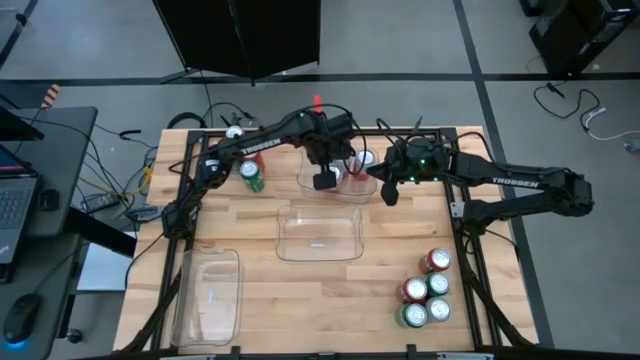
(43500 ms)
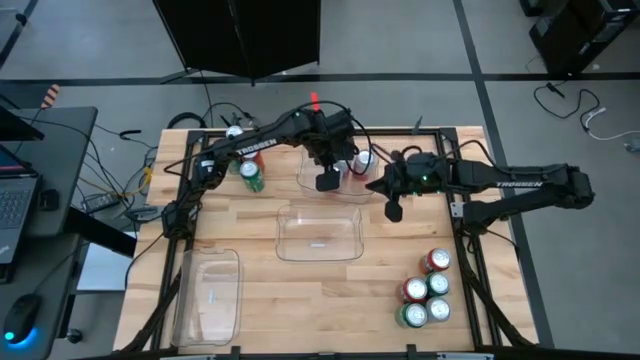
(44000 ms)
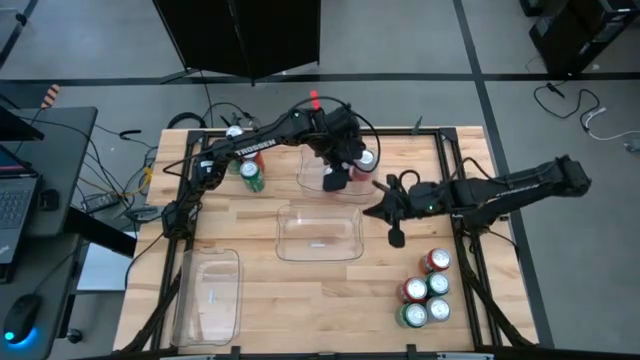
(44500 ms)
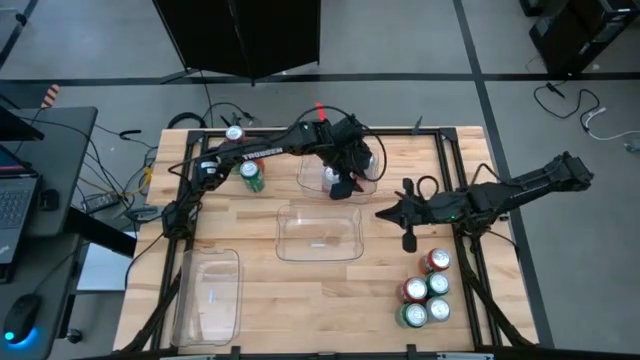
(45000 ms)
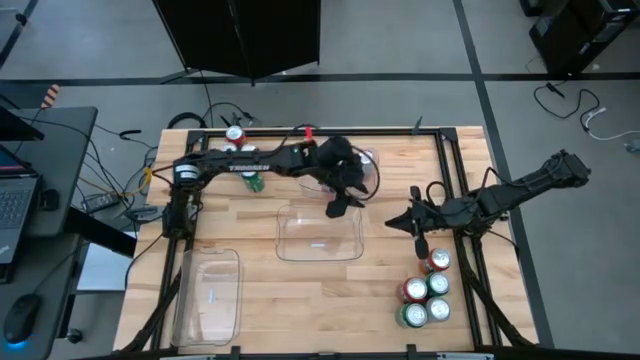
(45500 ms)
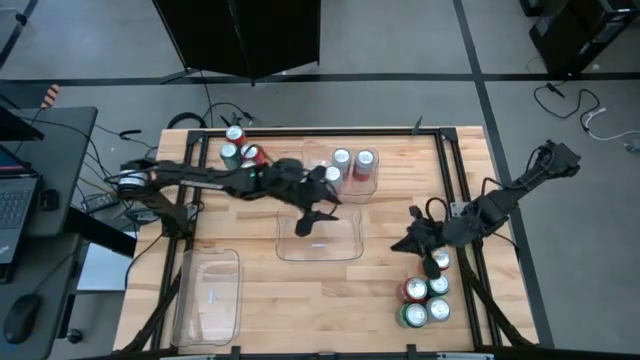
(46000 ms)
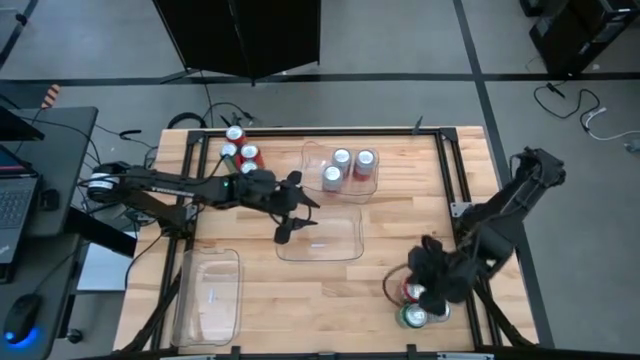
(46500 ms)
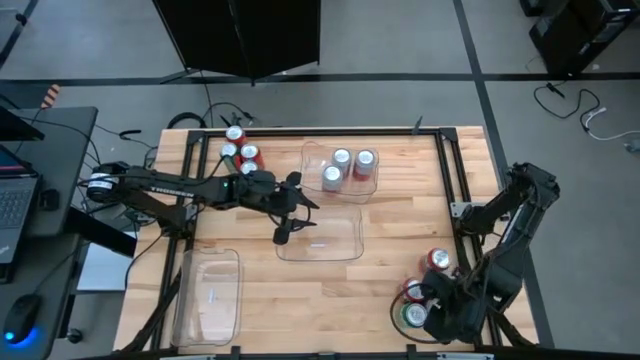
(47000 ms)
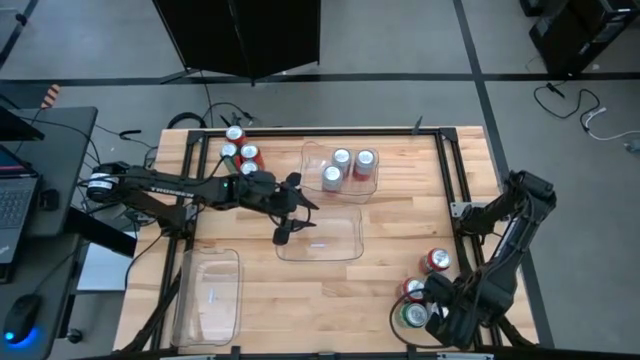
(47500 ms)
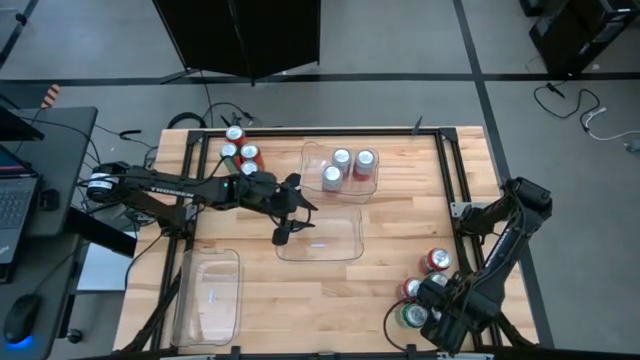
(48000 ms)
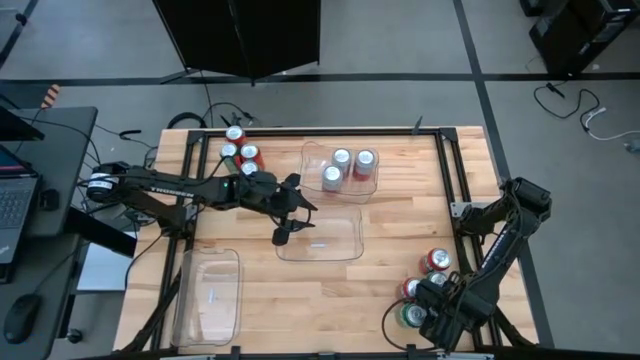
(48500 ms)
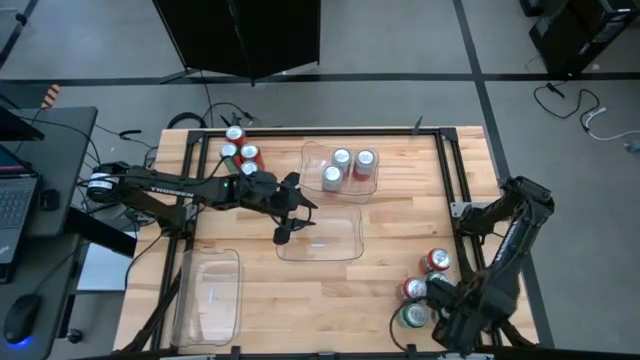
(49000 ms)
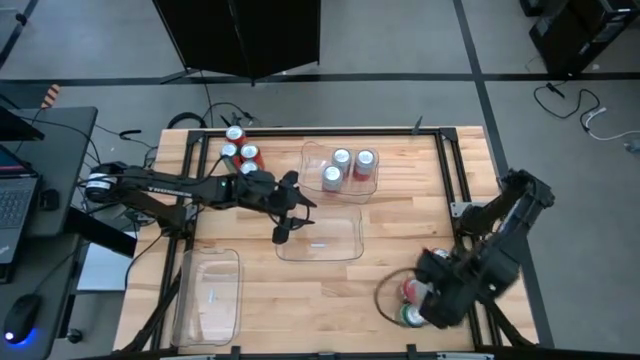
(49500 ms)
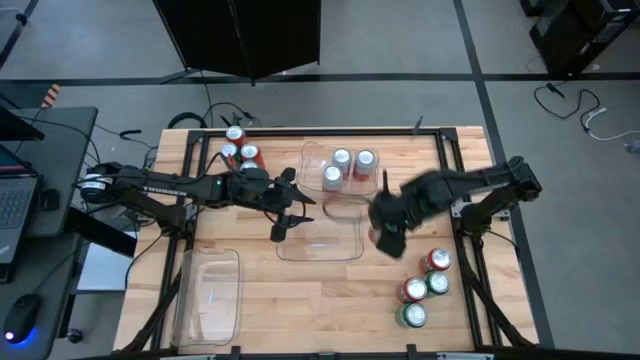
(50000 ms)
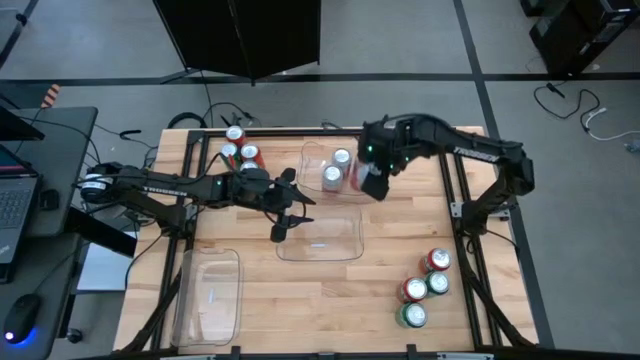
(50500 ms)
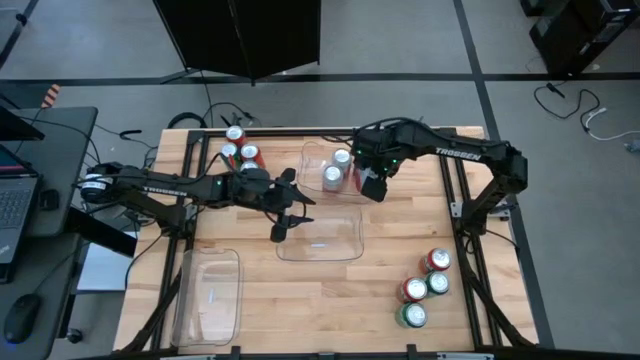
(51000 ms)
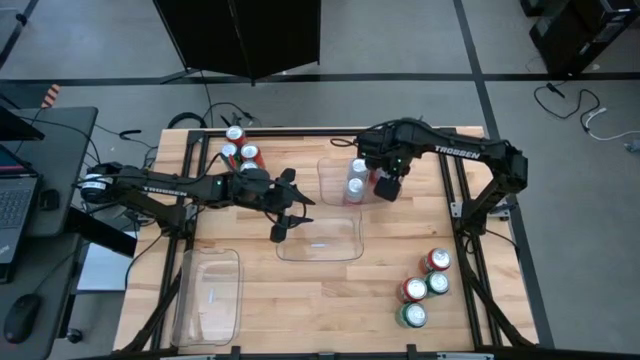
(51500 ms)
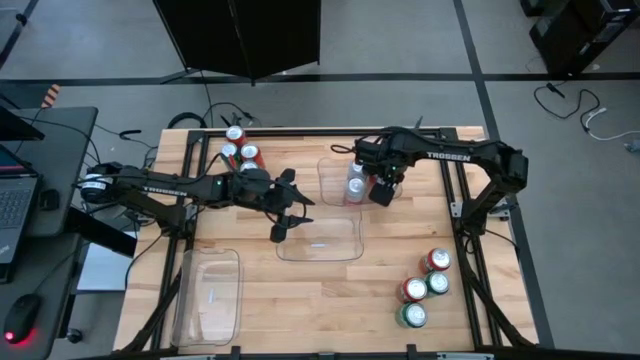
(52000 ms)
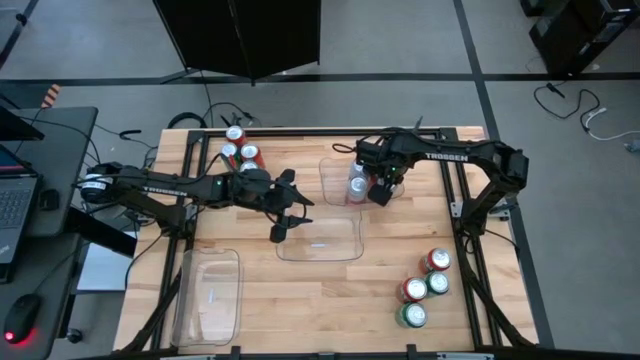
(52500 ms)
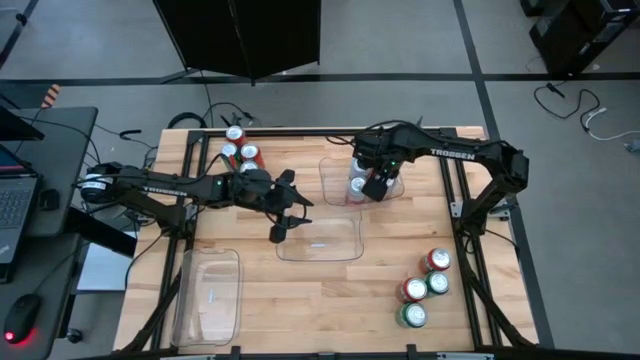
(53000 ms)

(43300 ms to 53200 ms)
Task: Sort soda cans
Put the pink white soda can into the top transparent bin

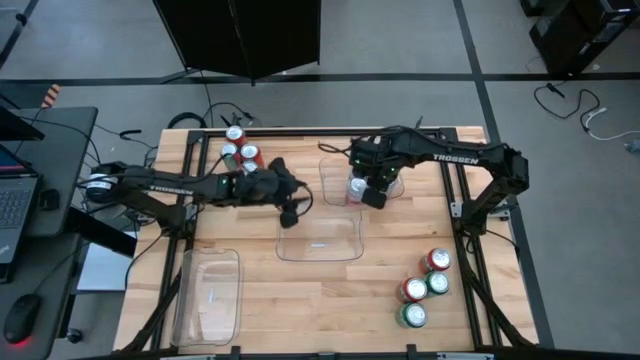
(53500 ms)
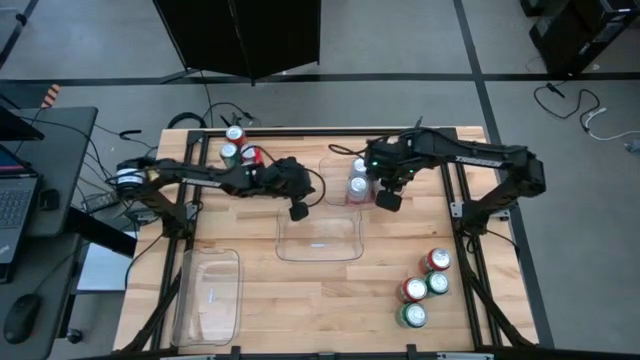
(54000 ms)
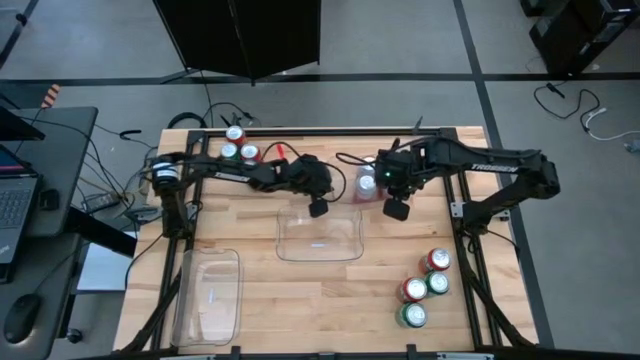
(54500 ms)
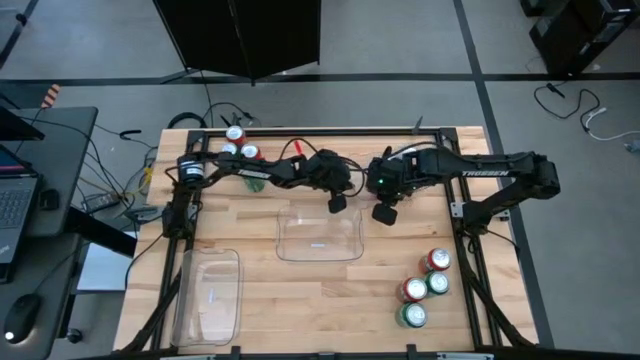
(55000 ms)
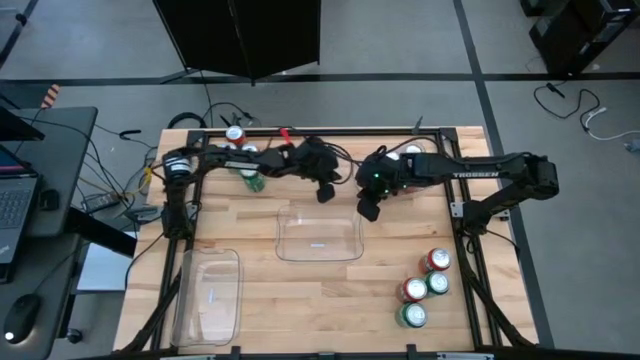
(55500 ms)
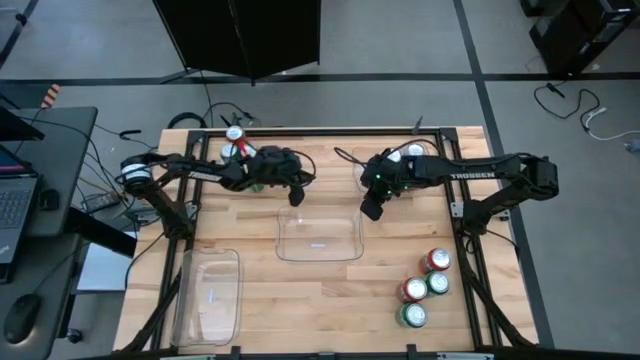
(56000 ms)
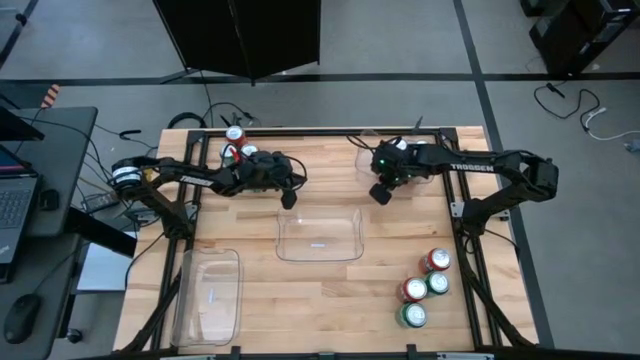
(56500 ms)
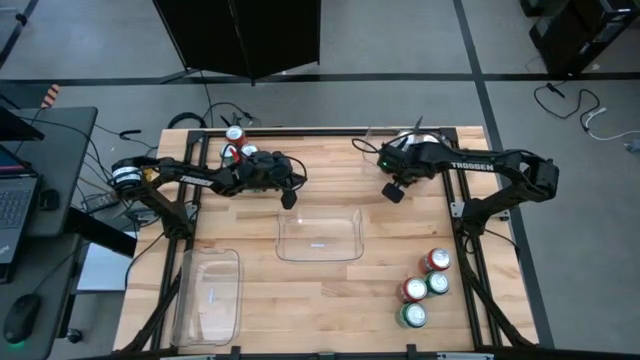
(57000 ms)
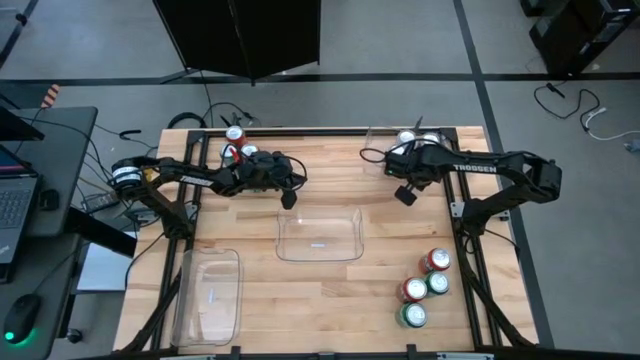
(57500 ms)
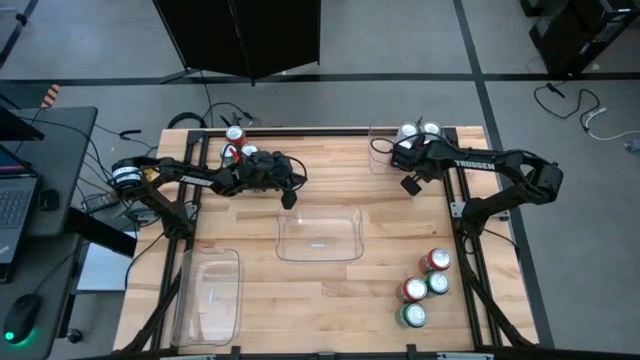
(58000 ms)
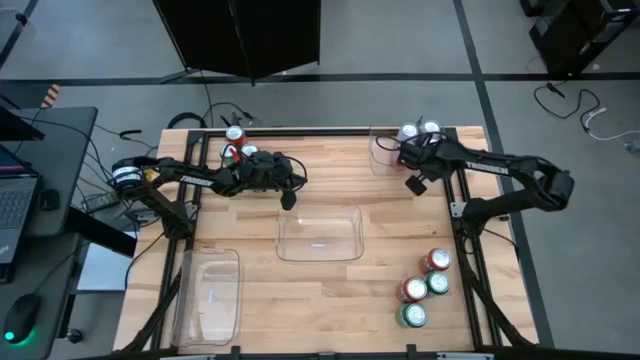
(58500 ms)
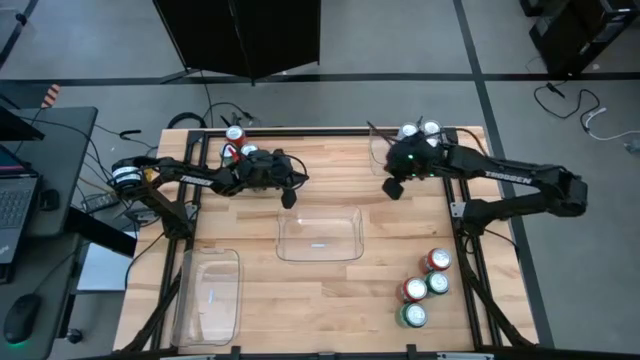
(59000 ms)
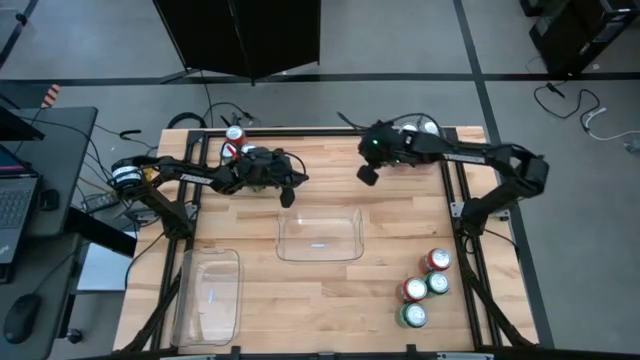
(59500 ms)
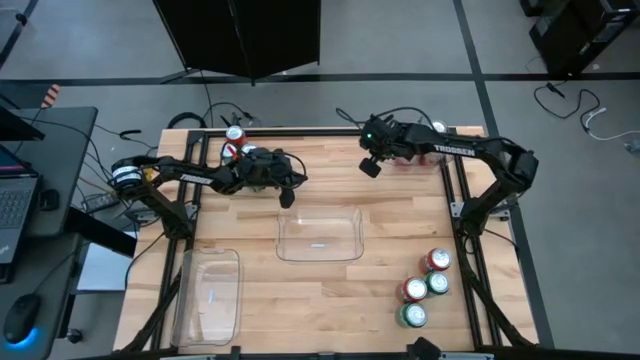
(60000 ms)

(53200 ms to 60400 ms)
Move the top transparent bin from the middle to the top right of the table

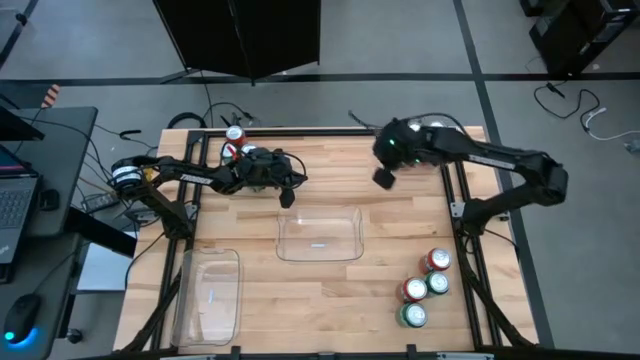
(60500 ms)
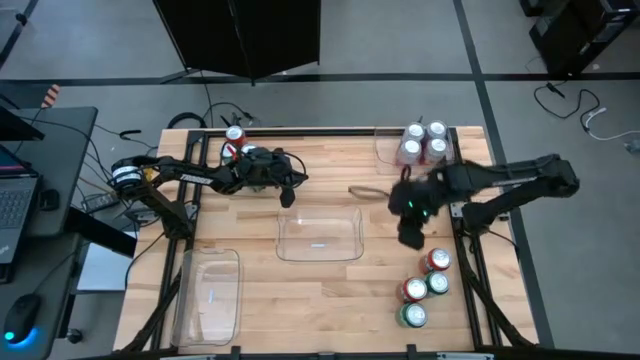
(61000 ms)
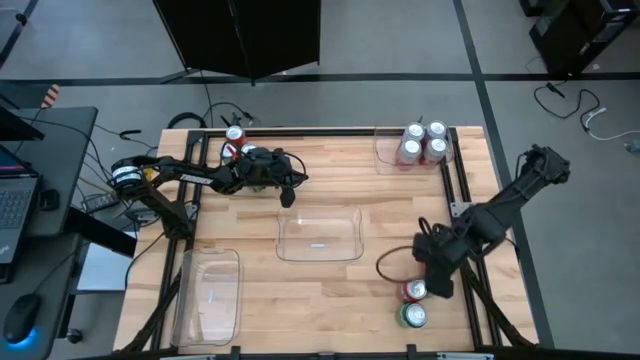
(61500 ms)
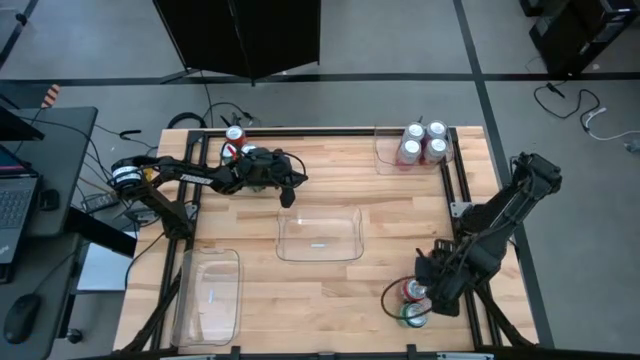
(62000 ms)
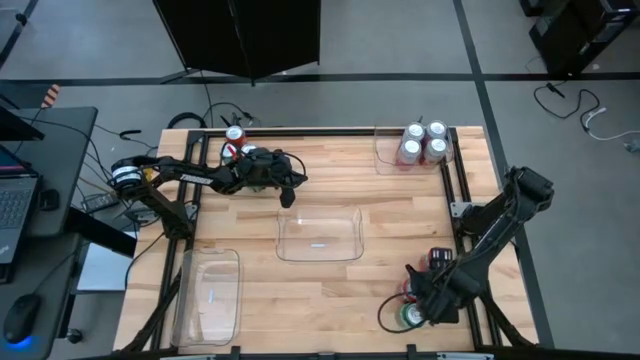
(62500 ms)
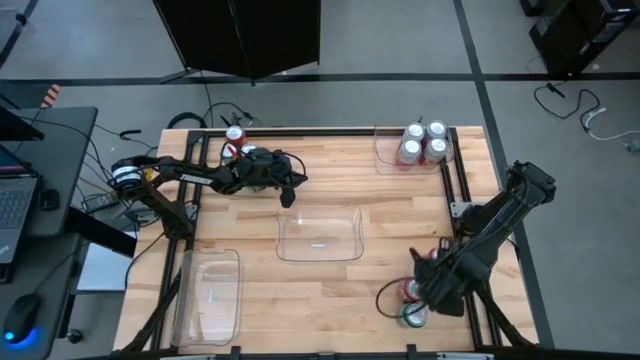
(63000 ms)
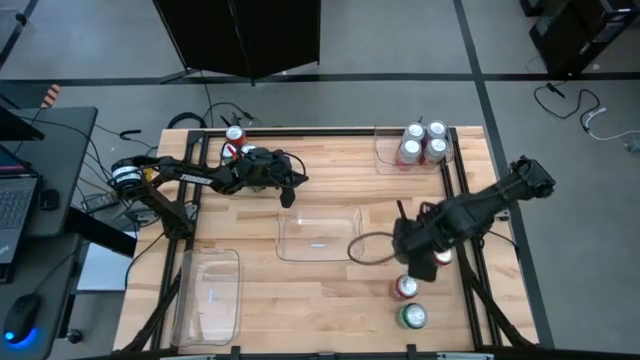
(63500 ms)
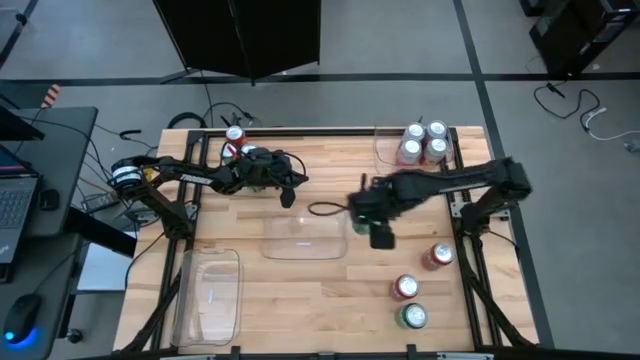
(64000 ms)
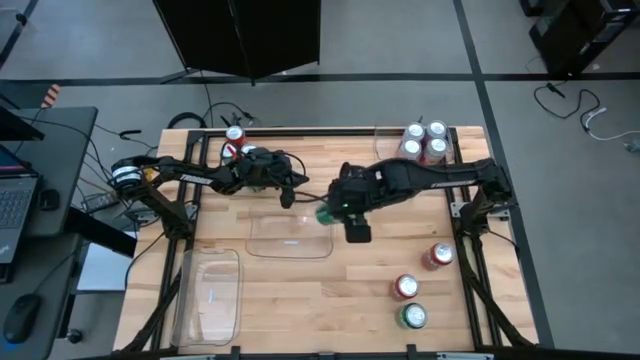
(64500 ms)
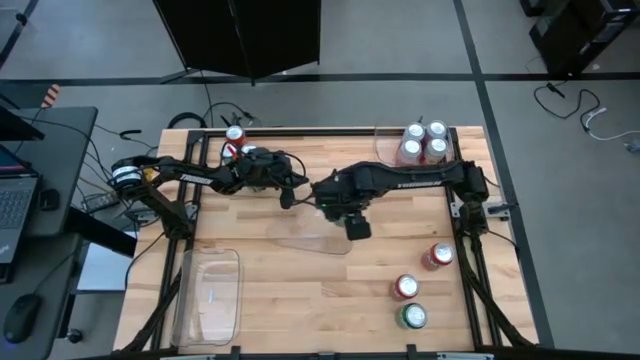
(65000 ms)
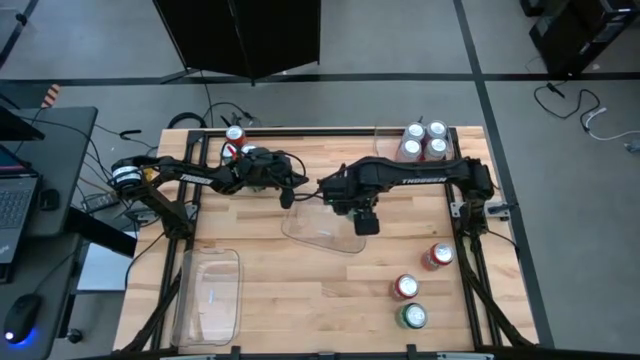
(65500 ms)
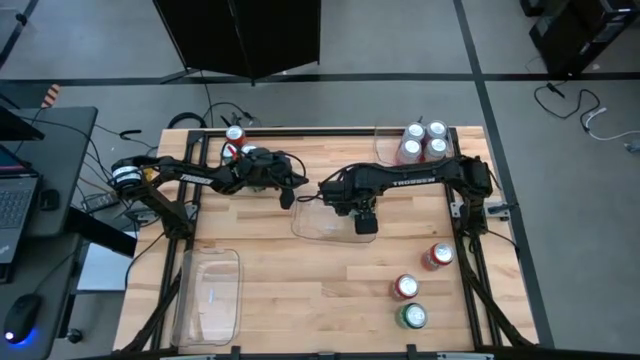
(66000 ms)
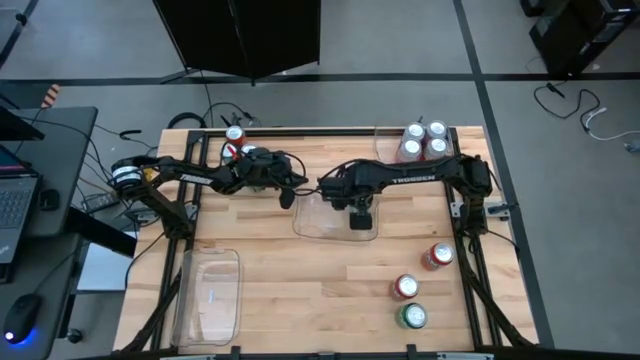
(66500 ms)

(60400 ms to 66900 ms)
Put the middle bottom green soda can into the middle transparent bin
